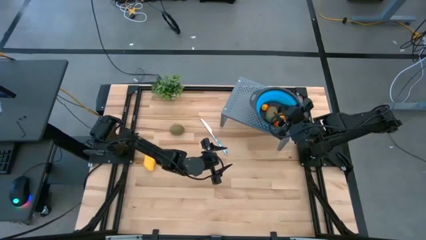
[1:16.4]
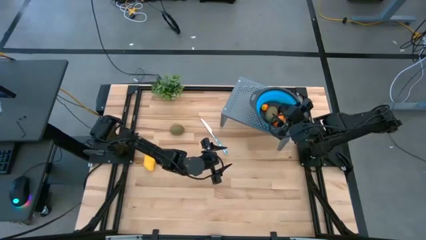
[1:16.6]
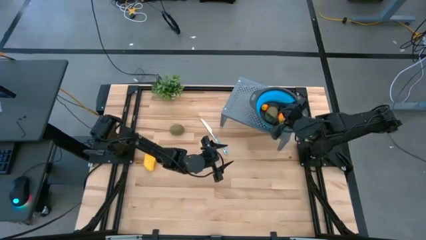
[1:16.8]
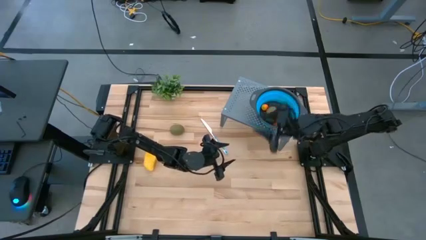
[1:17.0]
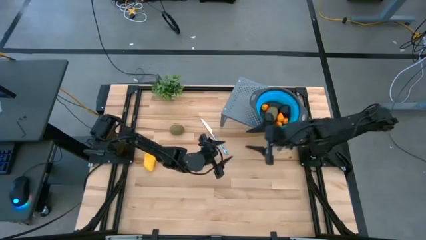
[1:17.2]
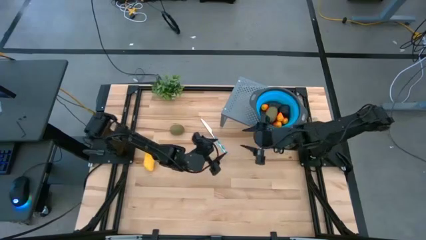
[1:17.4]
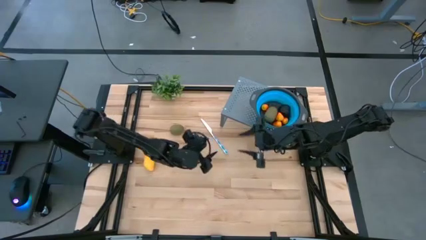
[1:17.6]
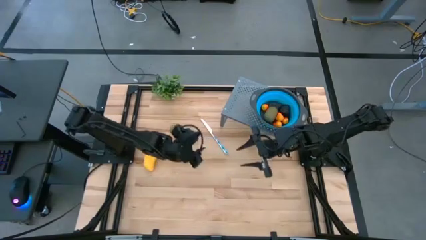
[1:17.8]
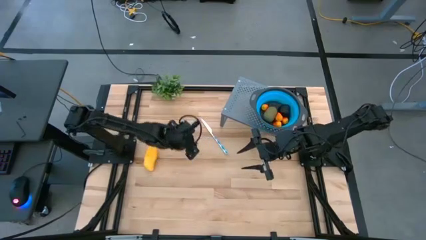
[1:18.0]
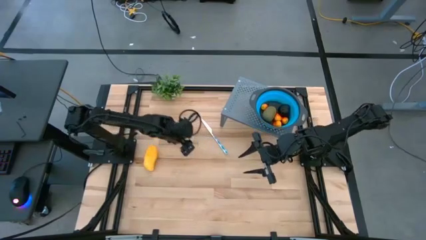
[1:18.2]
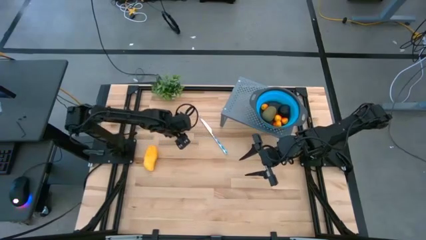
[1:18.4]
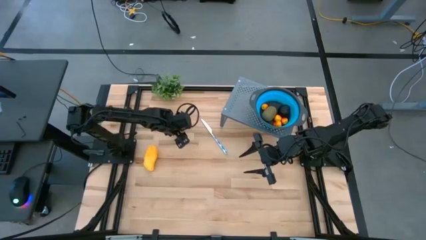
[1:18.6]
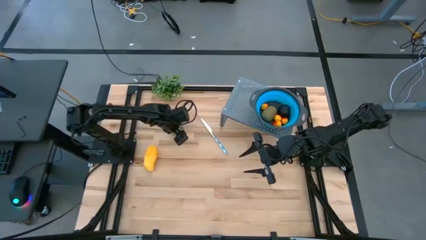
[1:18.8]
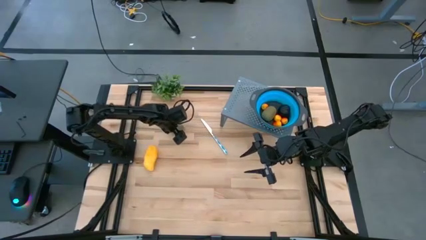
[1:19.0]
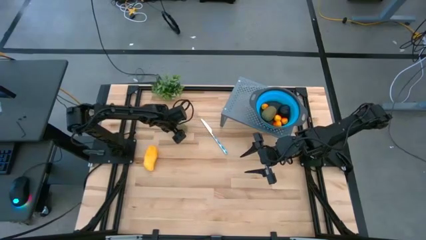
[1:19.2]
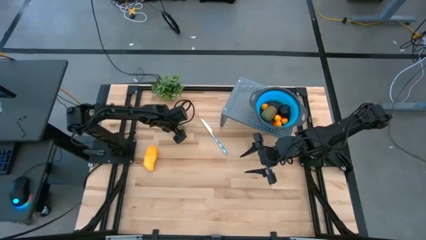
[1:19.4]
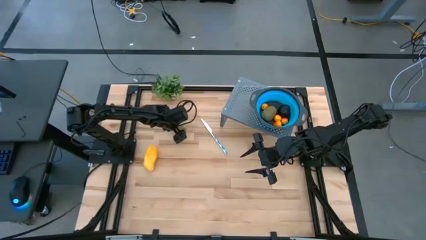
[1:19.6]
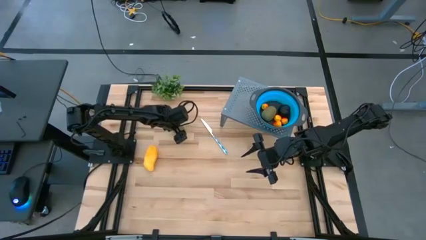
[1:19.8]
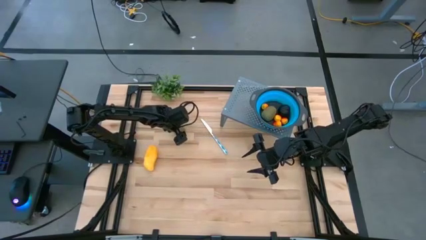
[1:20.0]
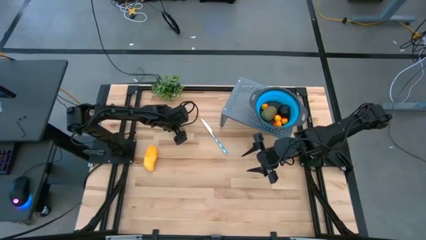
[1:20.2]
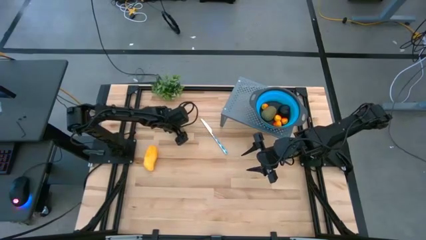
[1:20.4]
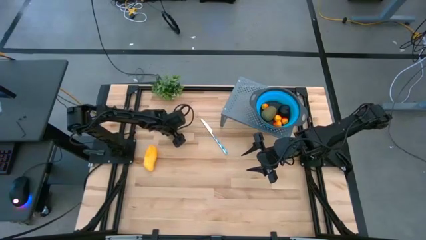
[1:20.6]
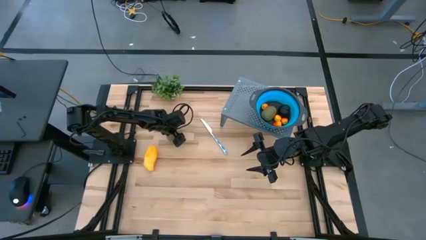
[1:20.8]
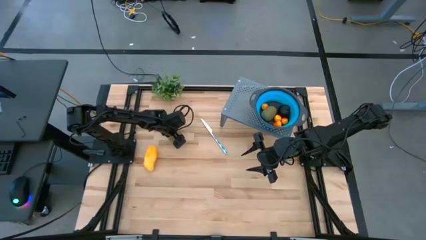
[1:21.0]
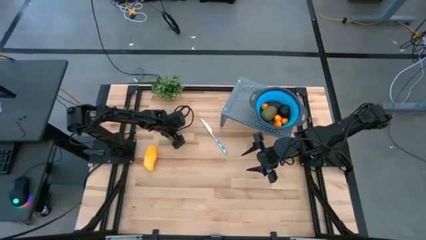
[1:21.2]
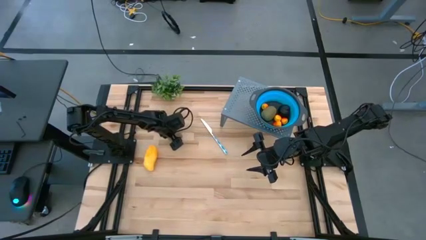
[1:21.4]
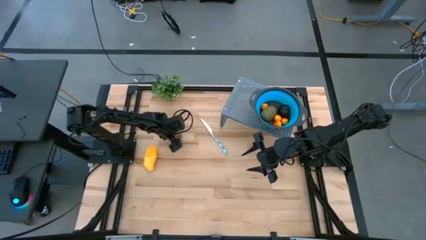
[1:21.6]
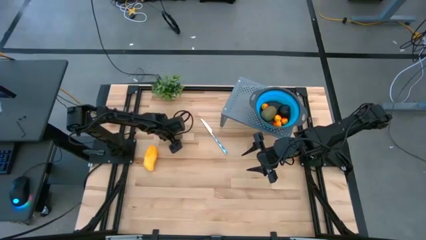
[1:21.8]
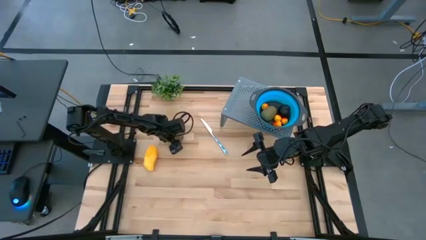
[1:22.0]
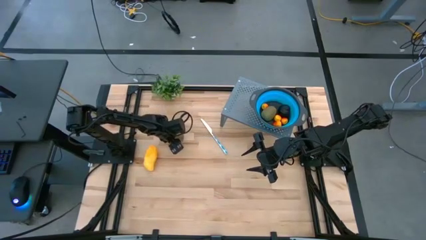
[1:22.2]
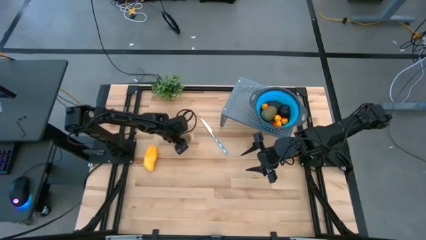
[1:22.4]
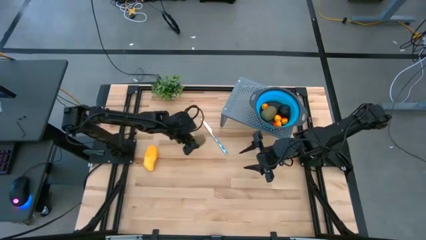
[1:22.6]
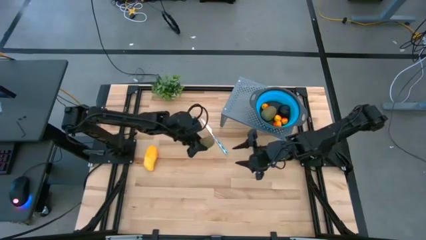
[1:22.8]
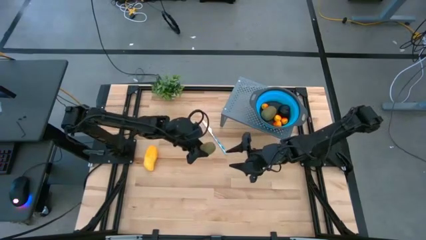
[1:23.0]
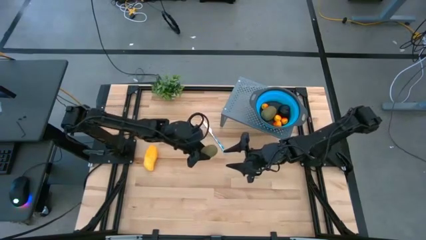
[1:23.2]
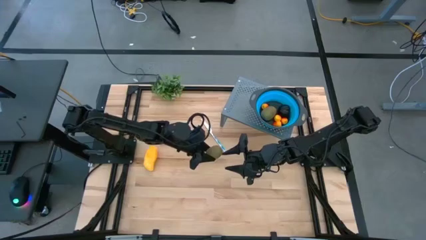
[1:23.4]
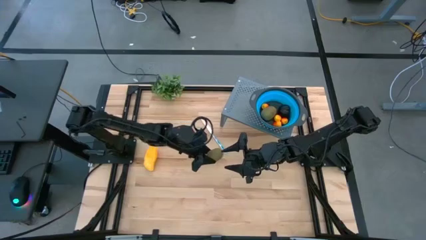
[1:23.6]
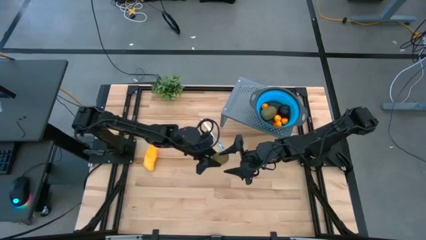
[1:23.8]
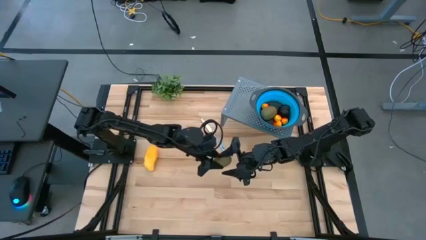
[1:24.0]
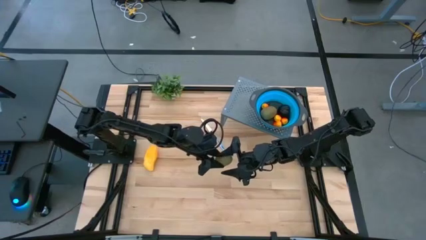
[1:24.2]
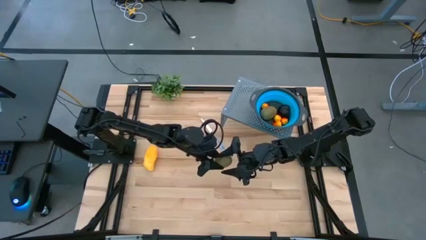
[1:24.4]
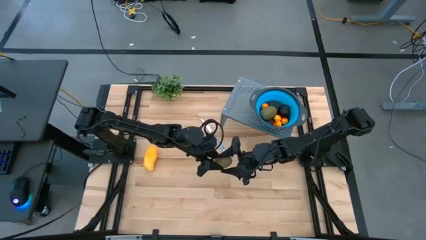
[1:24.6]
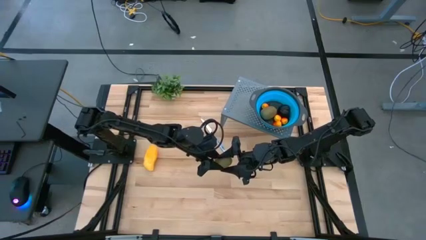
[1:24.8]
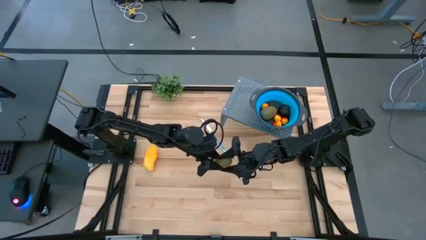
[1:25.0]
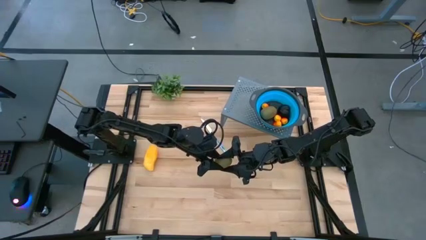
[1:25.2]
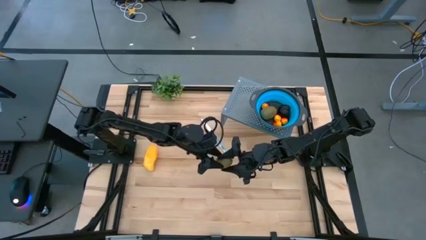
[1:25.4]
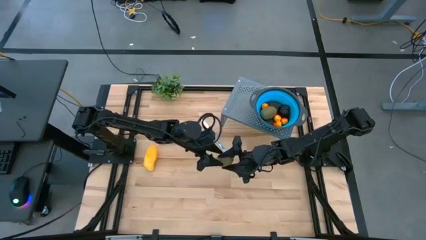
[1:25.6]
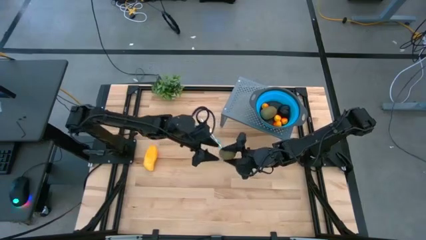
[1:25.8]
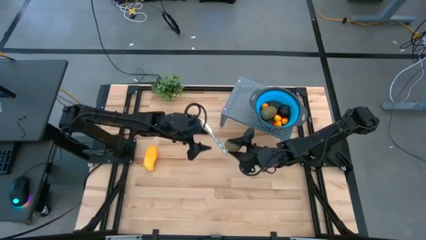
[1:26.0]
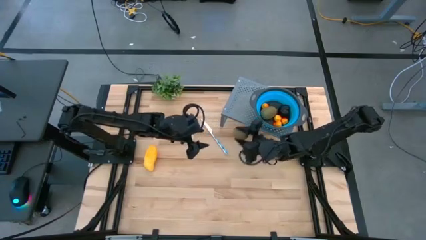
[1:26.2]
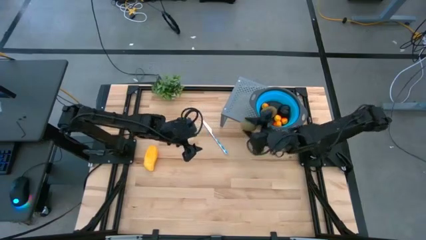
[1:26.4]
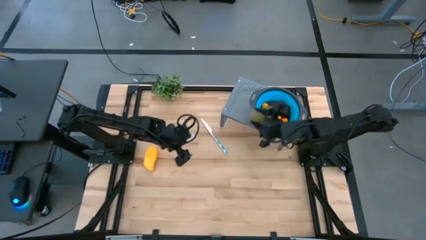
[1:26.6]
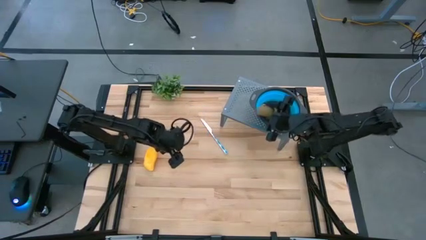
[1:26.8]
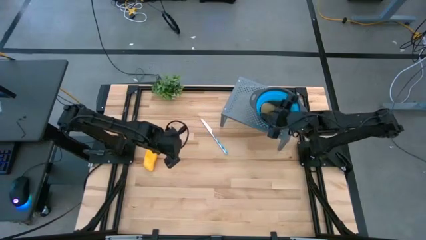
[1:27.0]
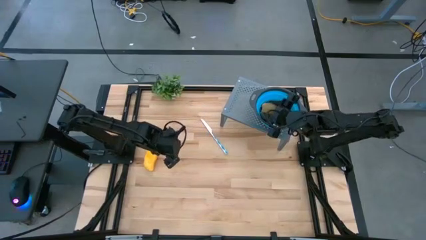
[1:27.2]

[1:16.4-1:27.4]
Task: Pick & Place Fruit
Put the kiwi into the blue strainer bowl on the shelf

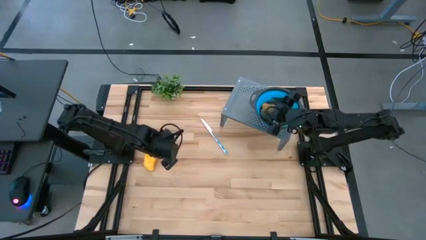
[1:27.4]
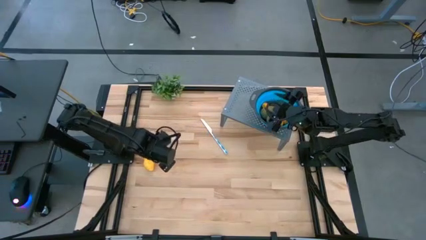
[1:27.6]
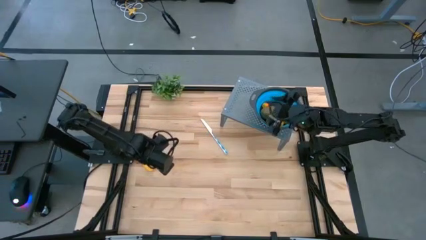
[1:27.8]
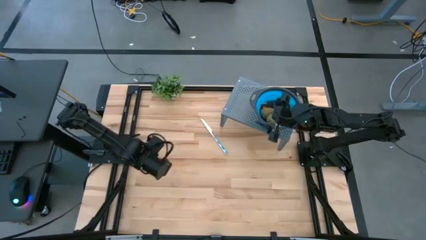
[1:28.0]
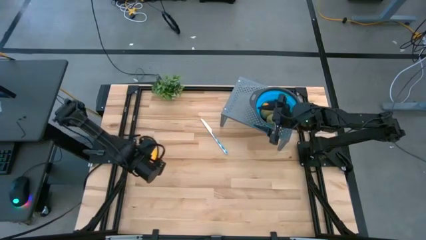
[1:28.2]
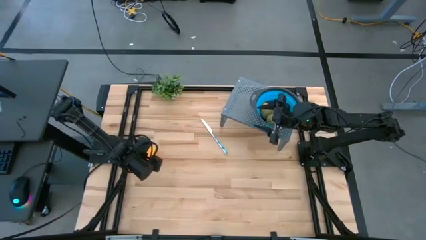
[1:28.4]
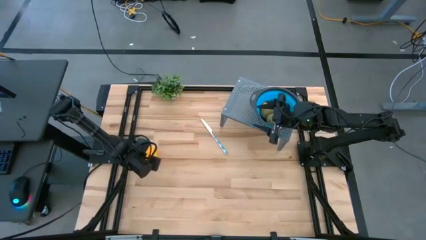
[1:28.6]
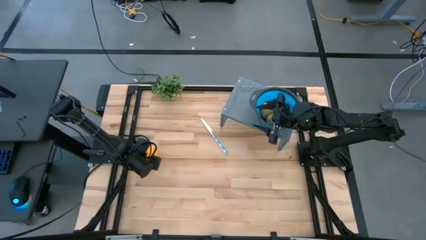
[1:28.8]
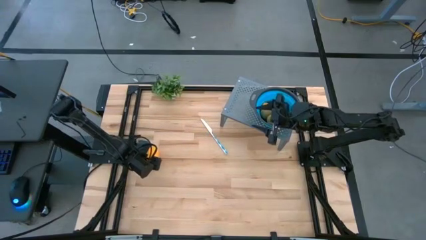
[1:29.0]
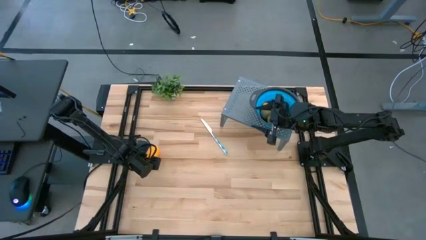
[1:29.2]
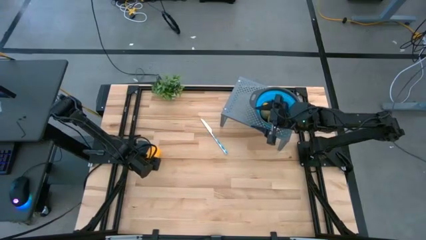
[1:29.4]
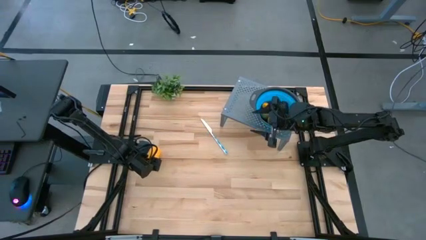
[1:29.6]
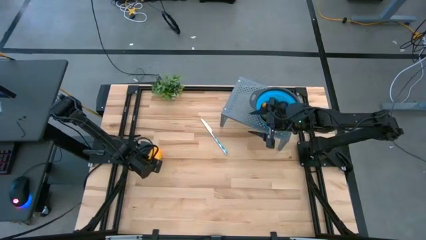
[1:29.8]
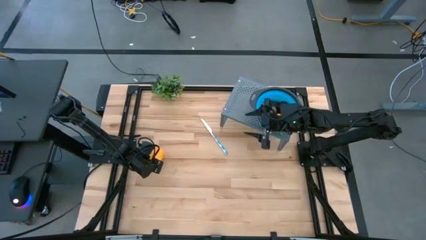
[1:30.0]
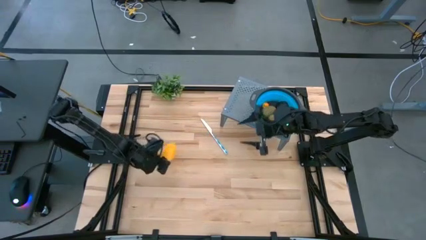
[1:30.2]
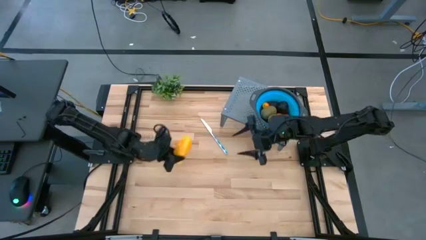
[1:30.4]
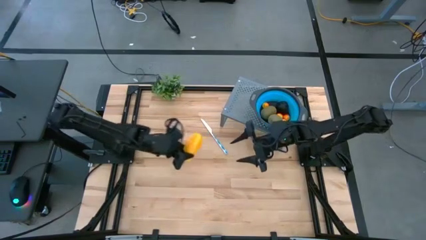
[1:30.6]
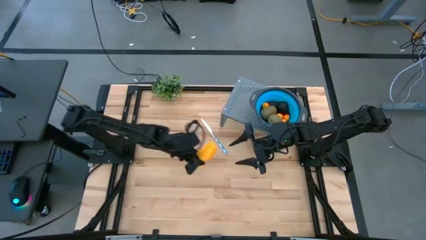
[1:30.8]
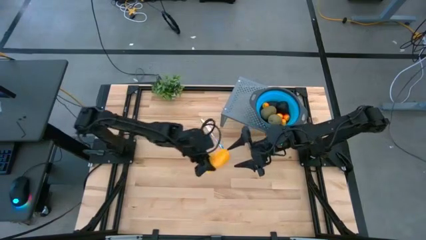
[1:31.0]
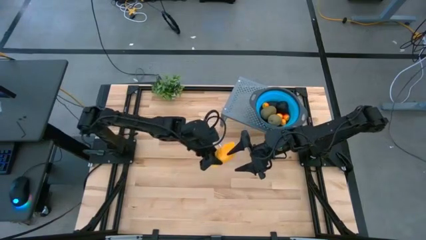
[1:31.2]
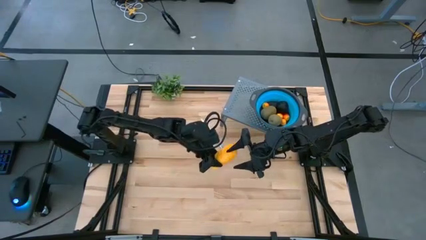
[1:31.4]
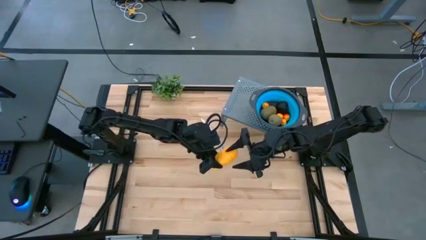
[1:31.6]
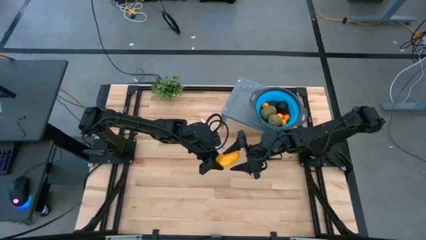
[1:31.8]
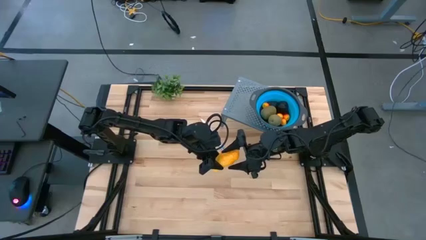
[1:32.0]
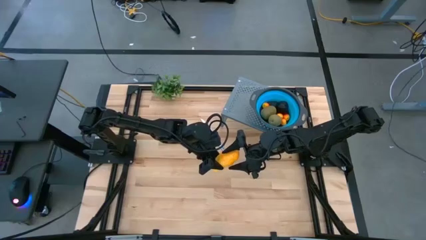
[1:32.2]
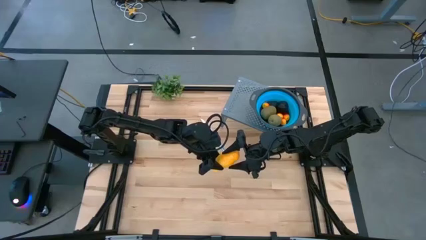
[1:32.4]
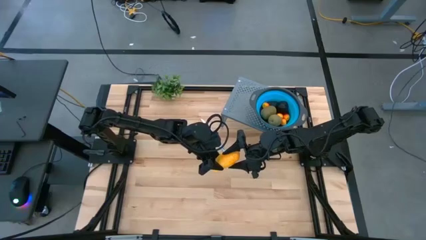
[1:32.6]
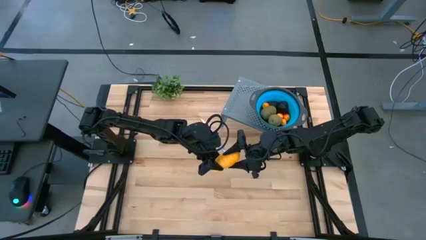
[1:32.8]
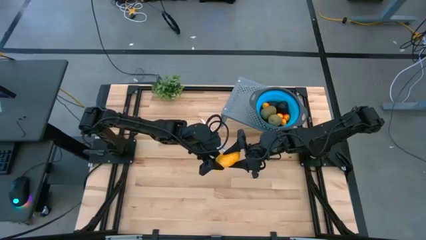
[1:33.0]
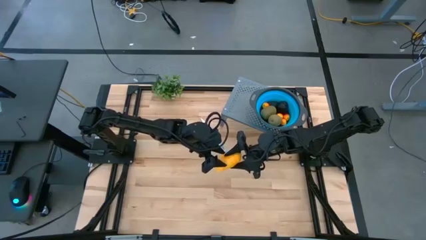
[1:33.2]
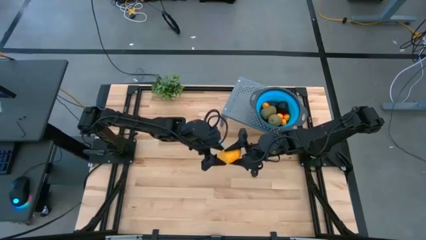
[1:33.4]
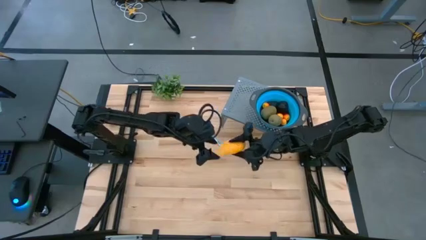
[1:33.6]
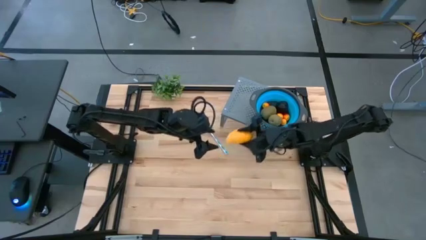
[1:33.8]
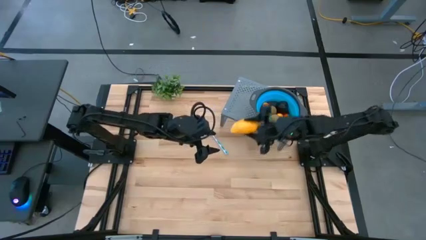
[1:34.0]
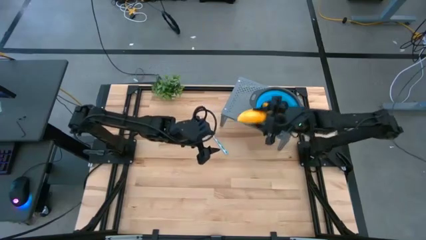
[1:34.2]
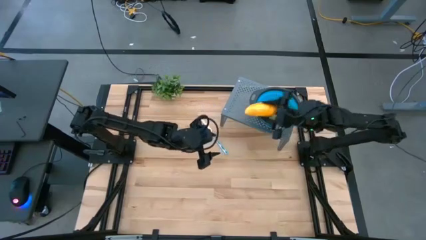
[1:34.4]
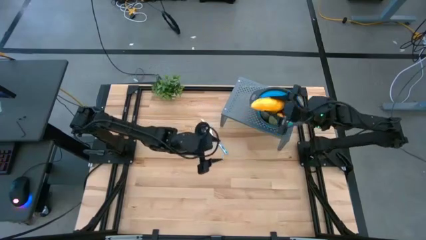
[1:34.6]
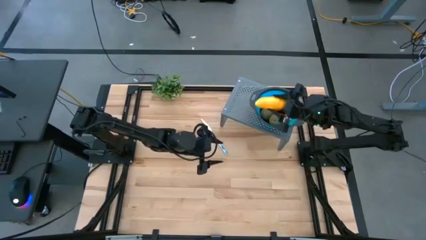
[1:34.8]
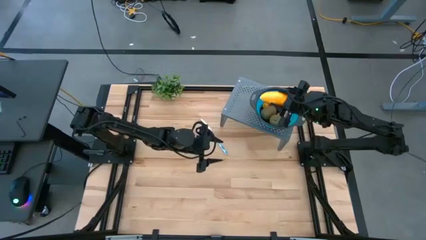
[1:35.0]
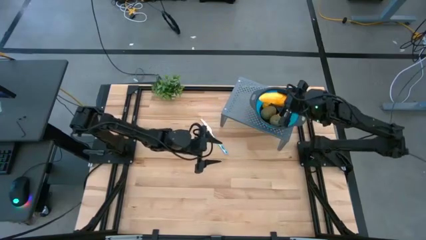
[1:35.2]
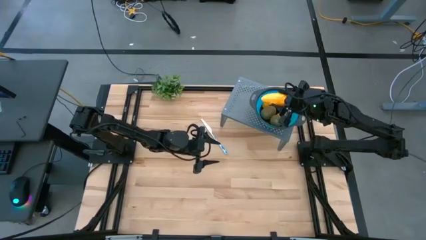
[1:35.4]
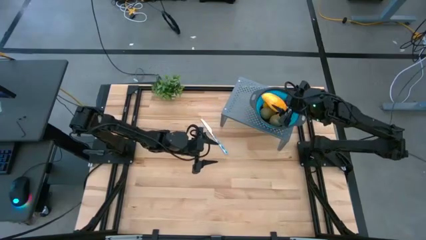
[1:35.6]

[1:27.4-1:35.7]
Put the mango into the blue strainer bowl on the shelf
